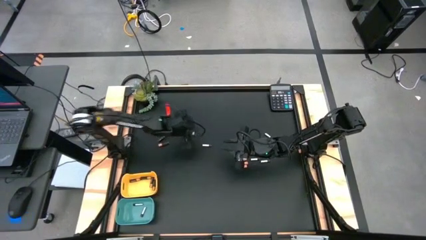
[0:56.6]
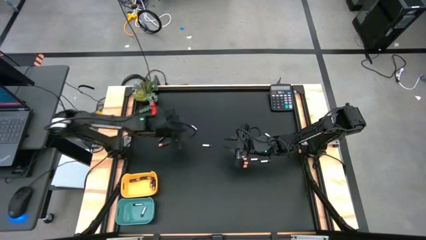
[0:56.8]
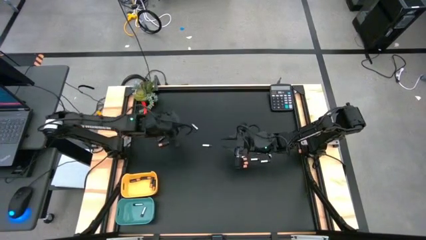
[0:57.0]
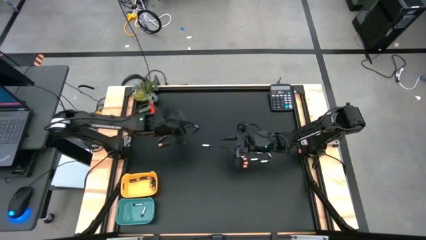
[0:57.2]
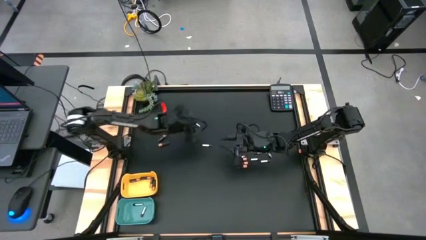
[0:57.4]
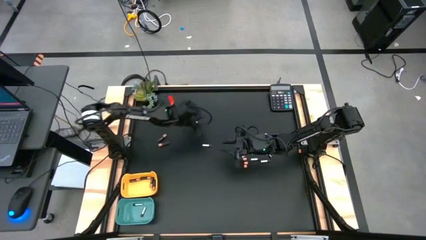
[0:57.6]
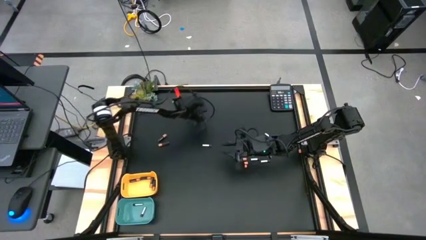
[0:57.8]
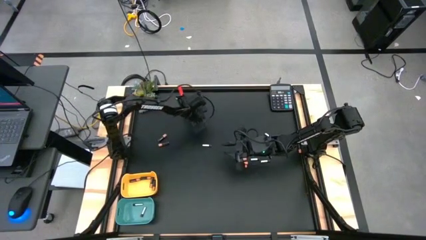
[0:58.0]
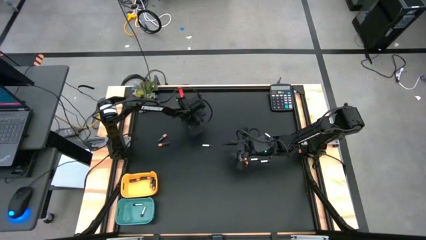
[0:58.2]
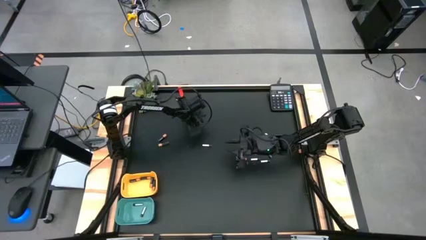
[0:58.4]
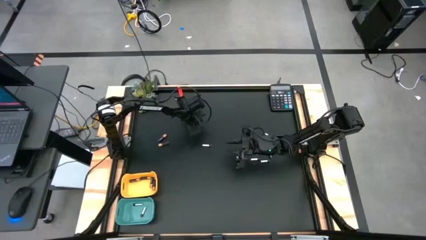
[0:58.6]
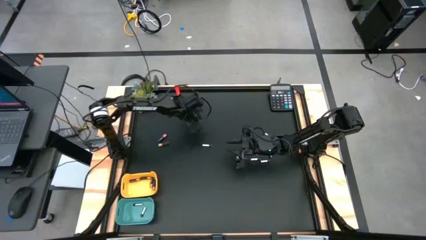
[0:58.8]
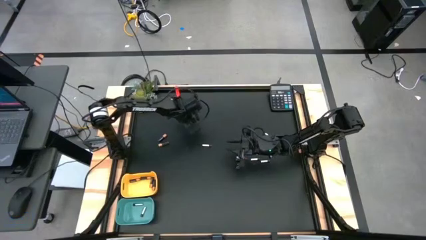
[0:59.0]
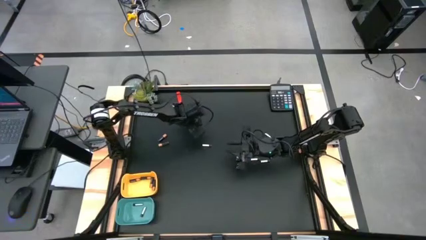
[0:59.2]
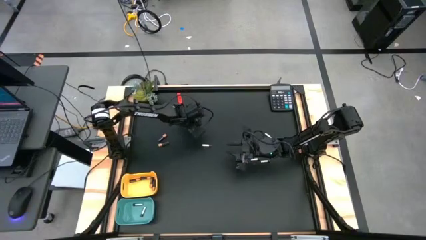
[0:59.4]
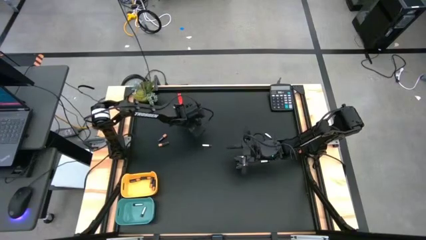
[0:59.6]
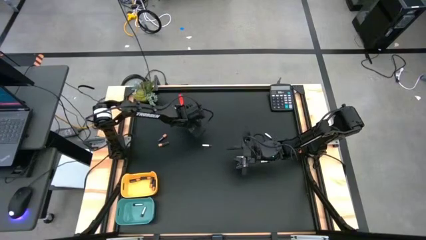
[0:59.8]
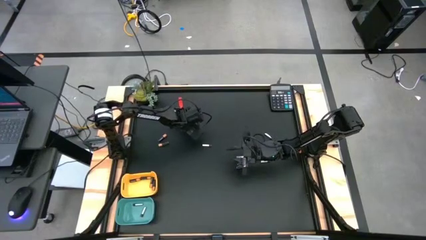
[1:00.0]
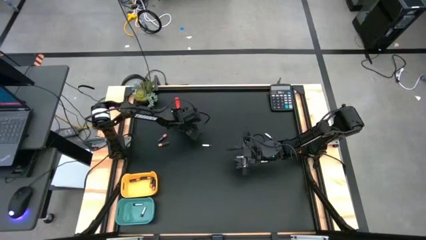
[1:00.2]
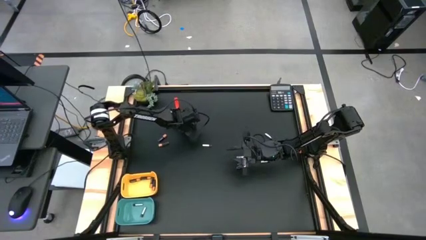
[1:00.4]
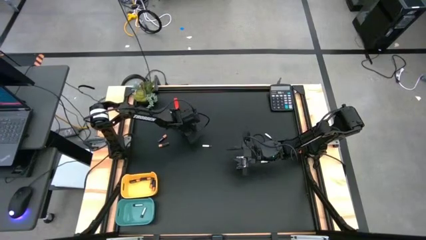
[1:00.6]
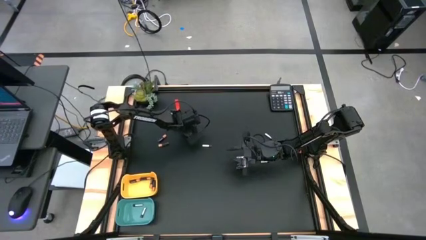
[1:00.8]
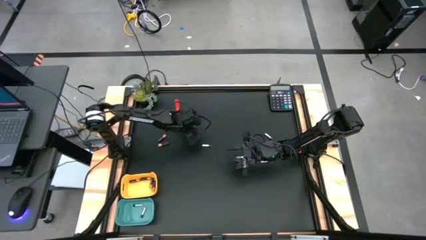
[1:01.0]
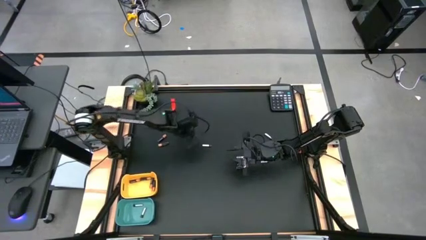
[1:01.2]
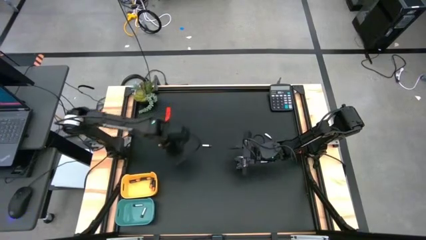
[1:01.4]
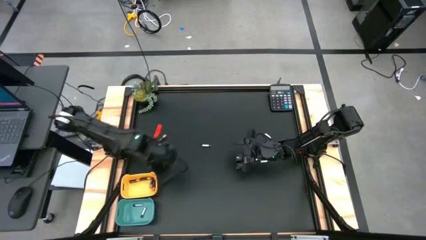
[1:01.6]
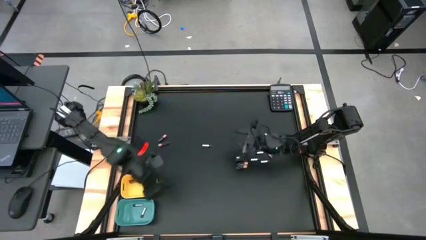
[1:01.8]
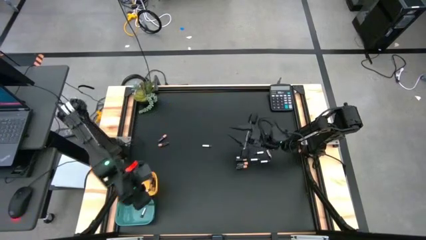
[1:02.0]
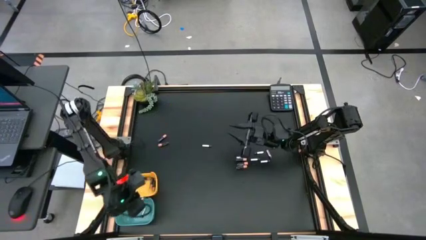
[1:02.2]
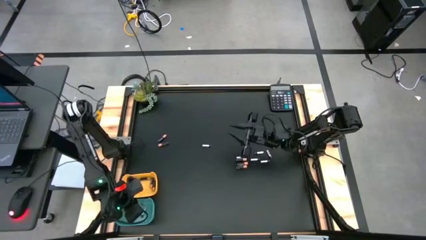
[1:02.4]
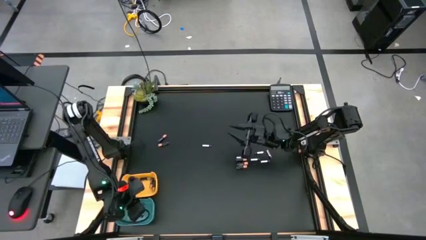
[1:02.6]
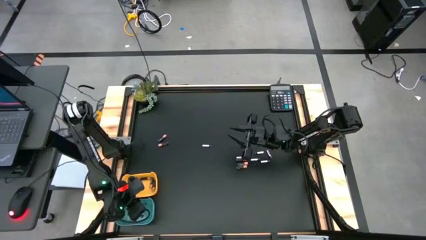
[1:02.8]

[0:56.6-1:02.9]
Task: Sort batteries
Put the silver battery into the green bin

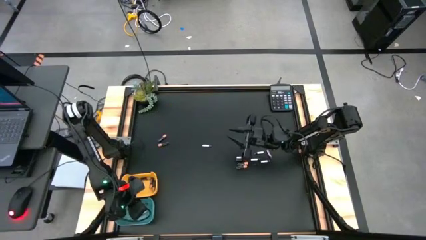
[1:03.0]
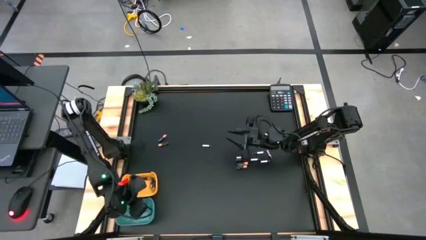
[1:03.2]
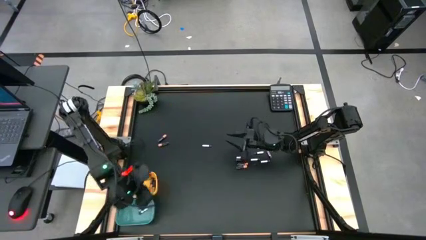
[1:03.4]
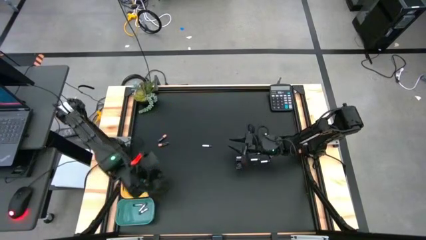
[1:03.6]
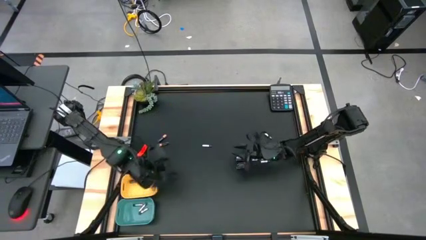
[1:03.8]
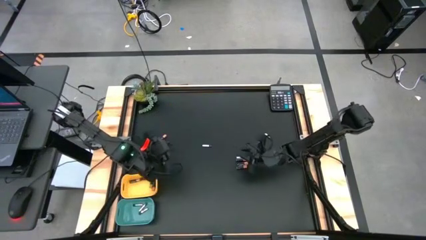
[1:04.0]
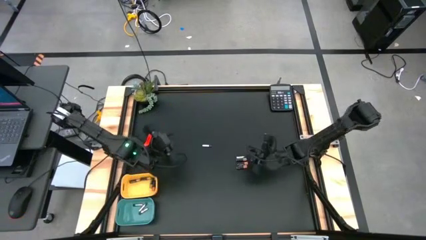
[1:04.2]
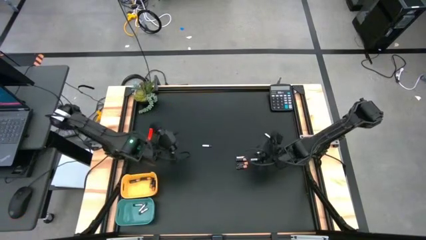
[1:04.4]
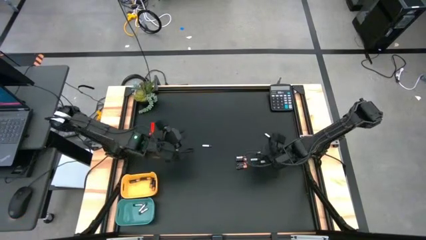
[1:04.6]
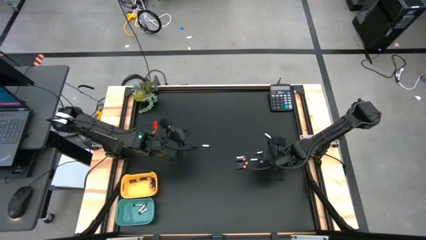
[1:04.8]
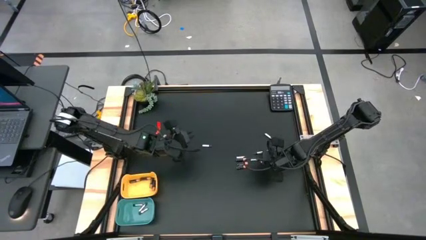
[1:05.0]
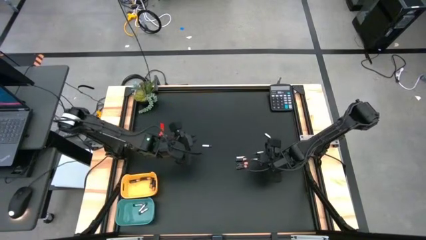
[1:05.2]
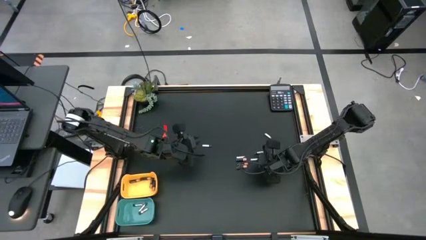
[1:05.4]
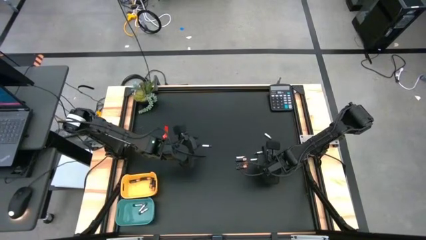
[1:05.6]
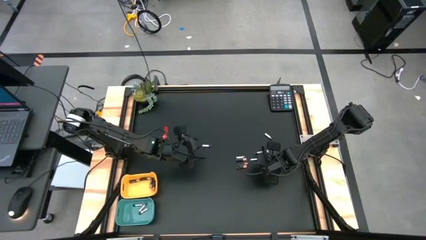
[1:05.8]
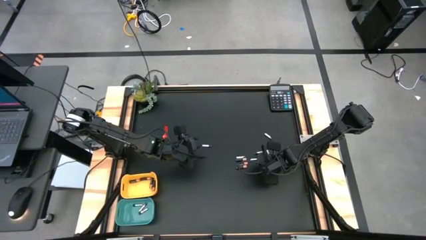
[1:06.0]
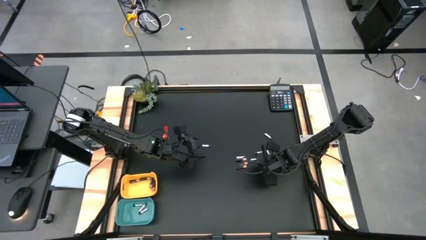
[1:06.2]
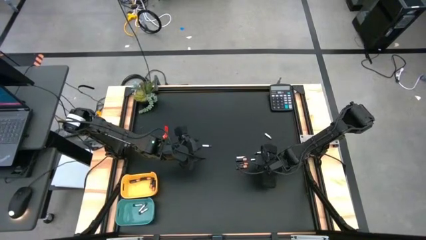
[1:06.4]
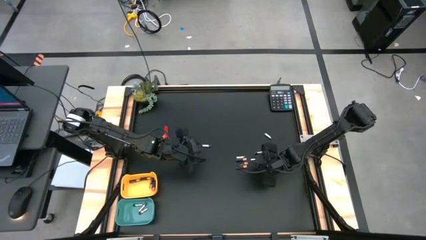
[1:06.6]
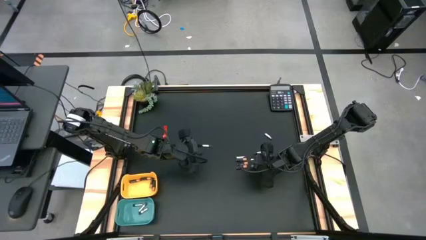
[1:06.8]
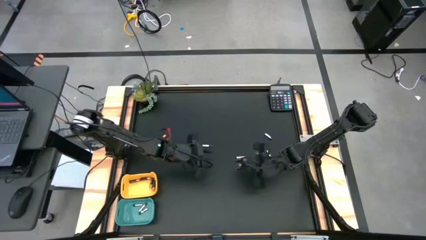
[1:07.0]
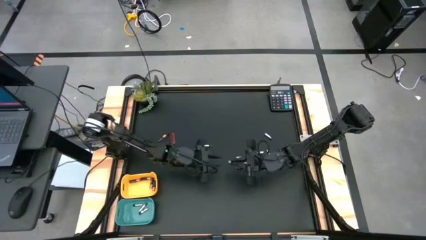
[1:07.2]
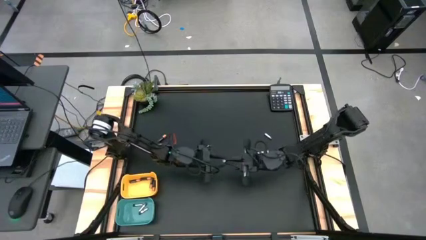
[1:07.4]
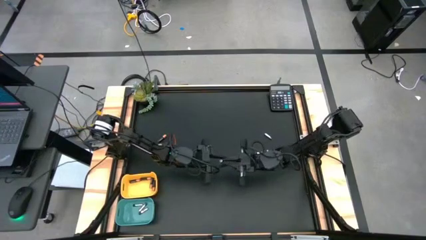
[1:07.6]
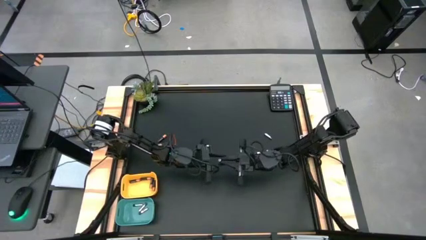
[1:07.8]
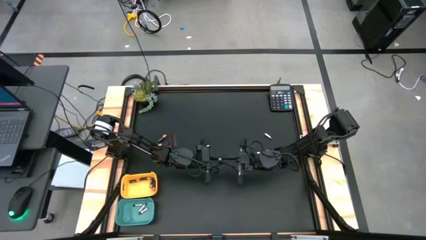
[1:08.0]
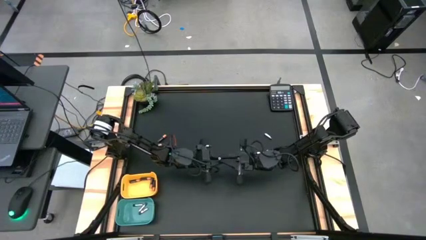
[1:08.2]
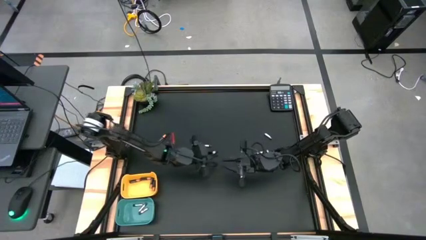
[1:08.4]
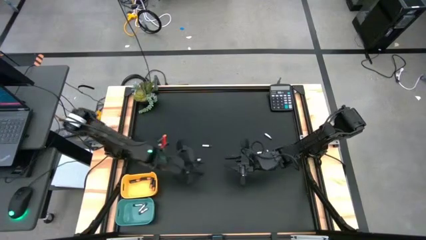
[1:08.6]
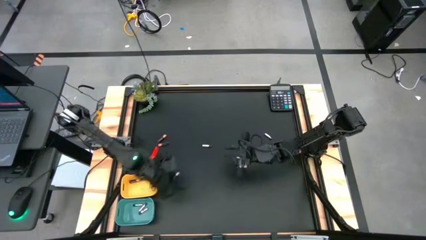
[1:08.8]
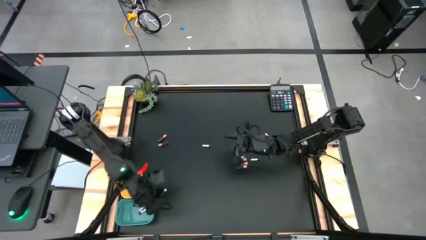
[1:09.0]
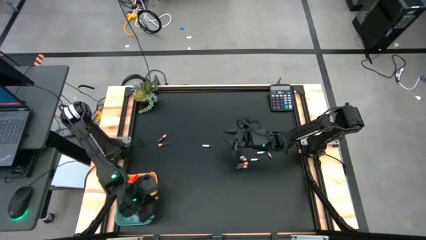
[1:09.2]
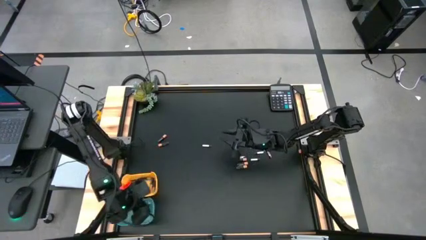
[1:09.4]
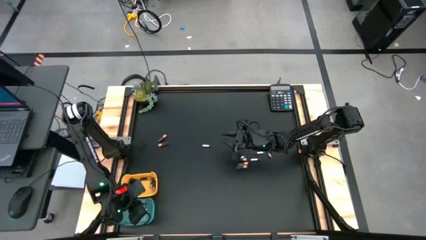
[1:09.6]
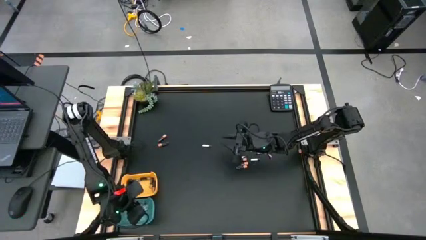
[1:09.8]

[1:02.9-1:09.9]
Put the silver battery into the green bin

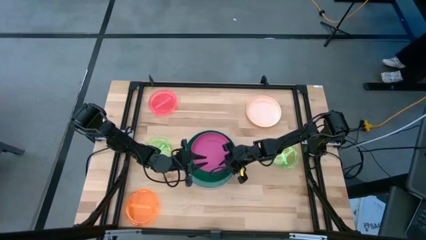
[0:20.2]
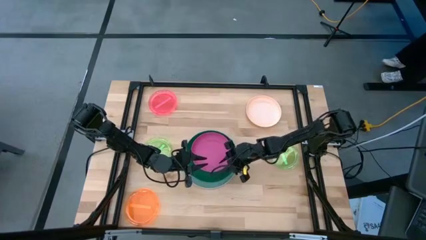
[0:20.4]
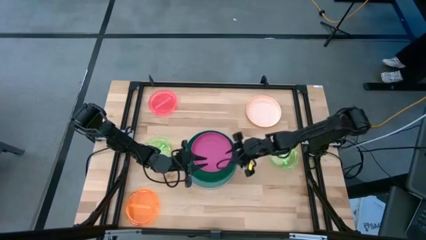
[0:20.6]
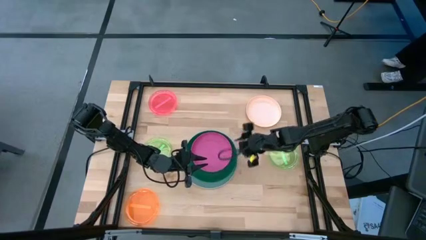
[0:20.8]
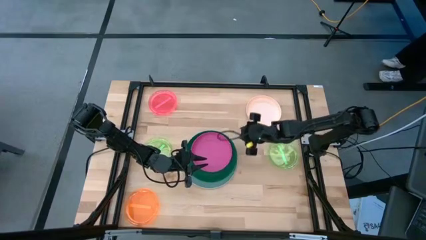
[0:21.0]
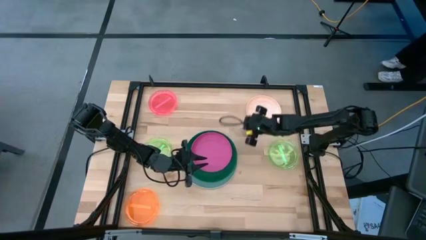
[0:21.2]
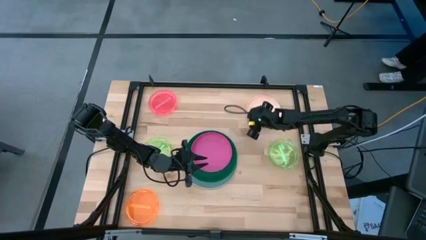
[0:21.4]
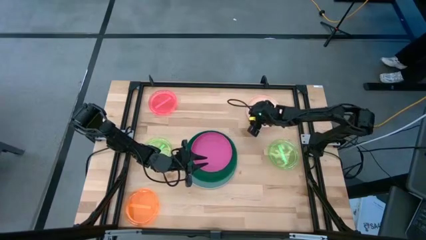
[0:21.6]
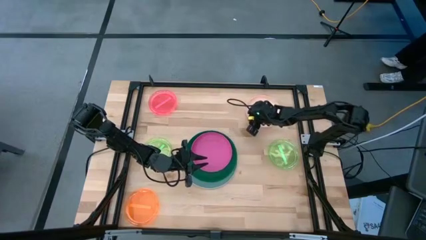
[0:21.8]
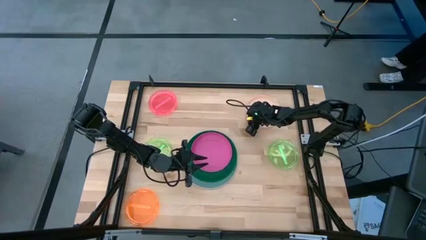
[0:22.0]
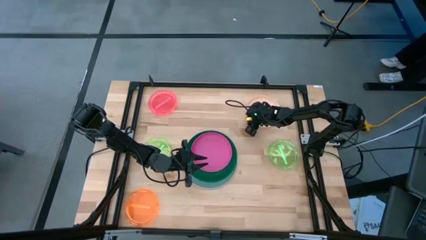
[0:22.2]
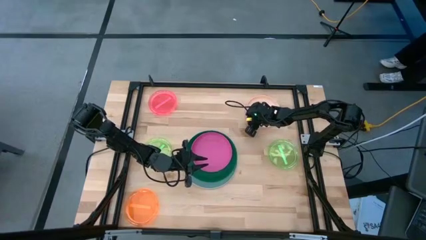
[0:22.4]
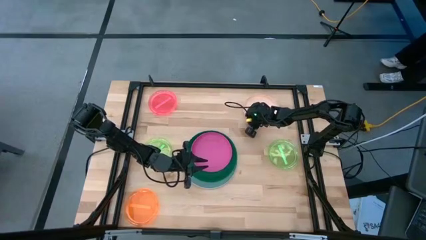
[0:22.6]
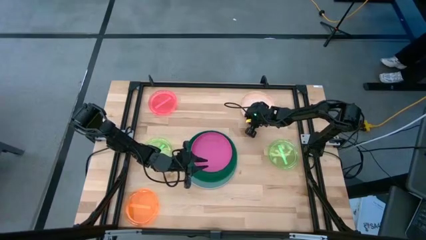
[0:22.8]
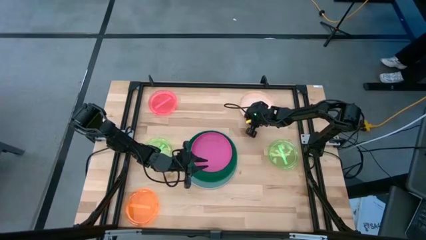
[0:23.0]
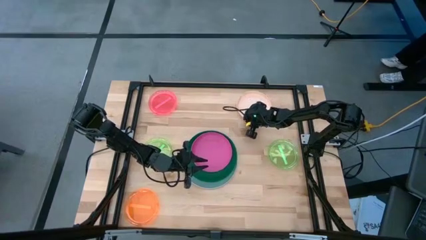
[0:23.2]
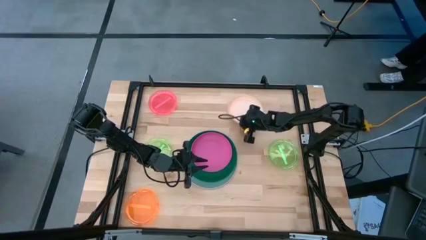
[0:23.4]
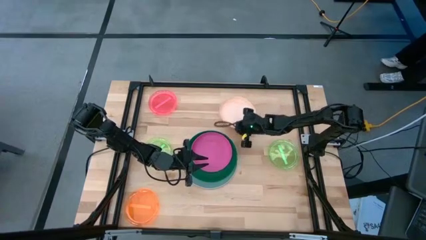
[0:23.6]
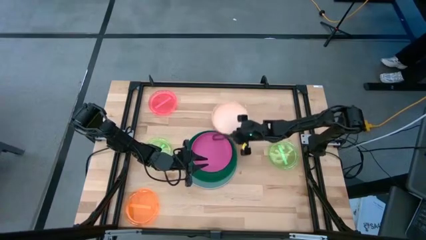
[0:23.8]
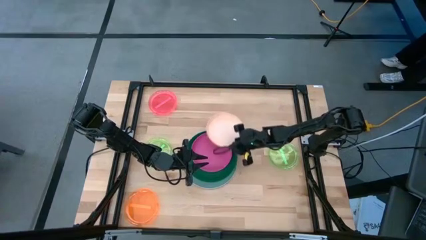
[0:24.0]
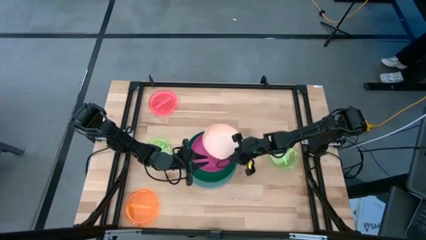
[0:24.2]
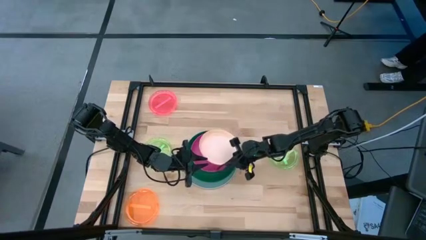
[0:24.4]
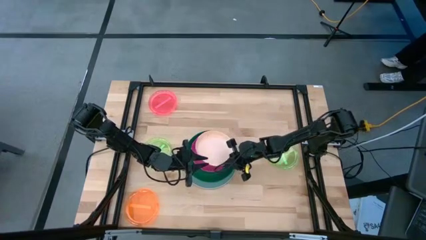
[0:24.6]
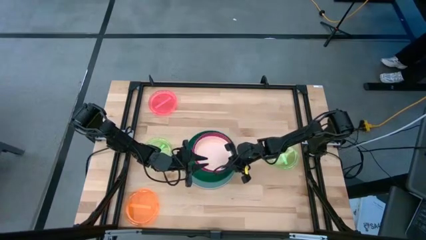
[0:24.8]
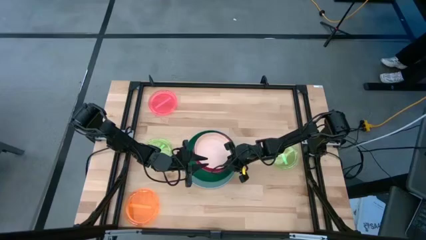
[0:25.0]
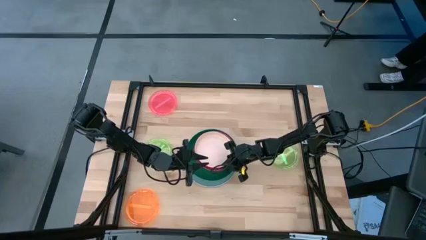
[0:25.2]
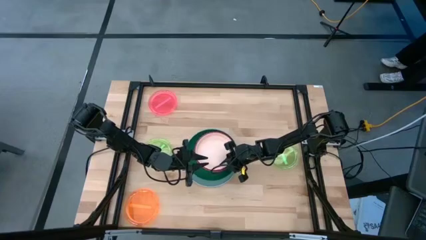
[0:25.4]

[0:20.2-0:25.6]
Task: Stack plastic plates
Stack the light orange plate on top of the pink plate
